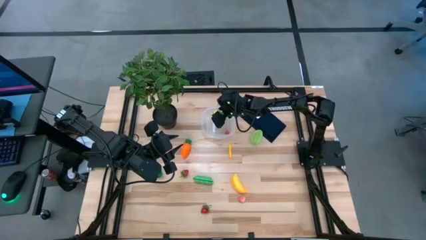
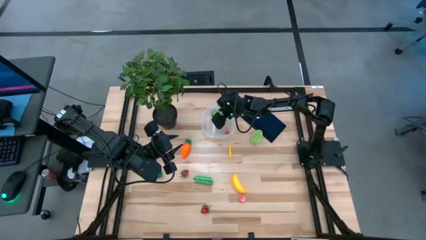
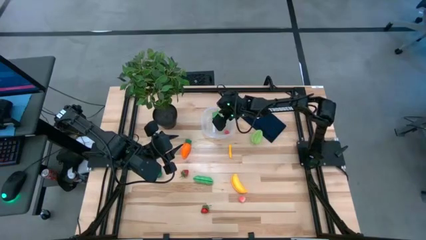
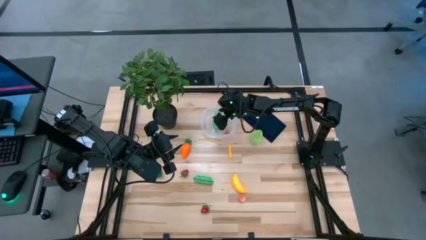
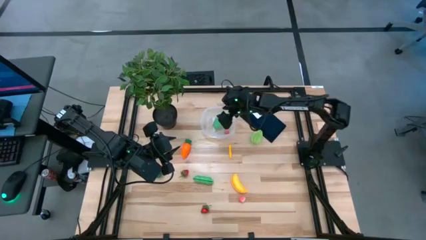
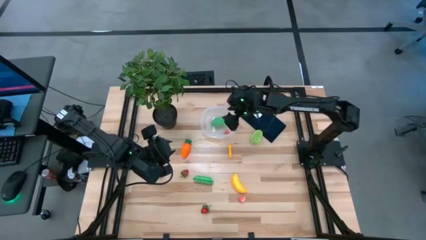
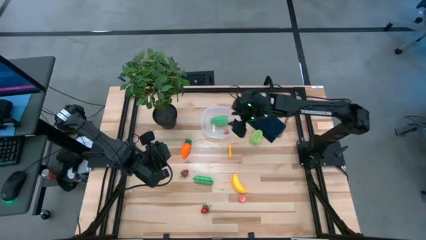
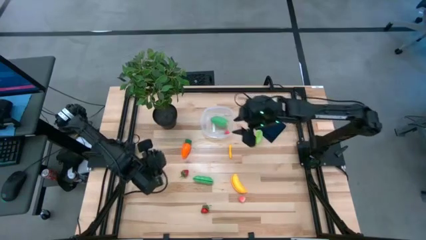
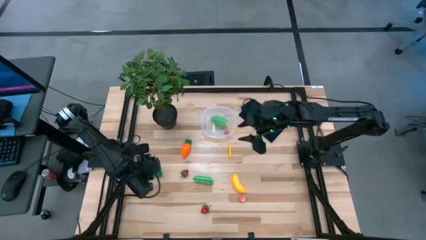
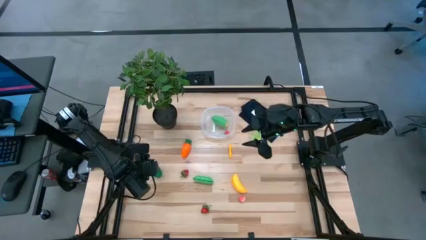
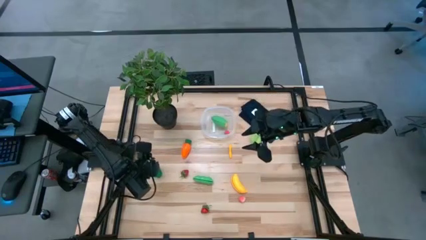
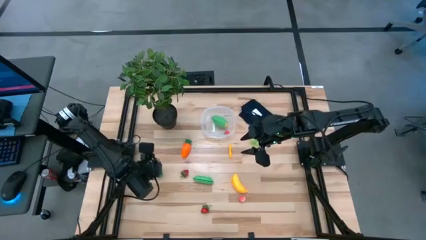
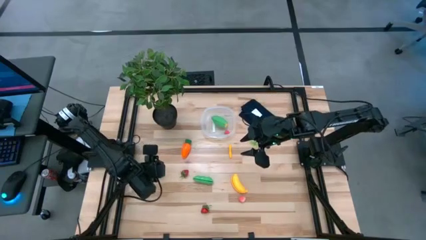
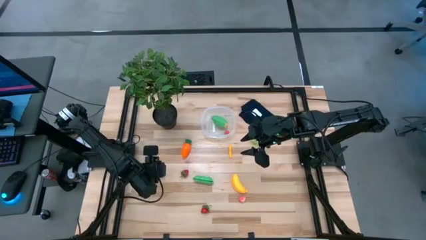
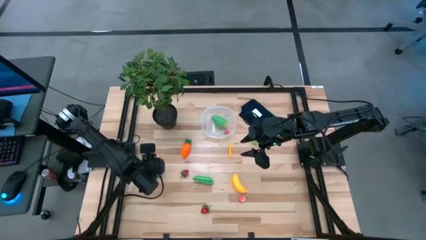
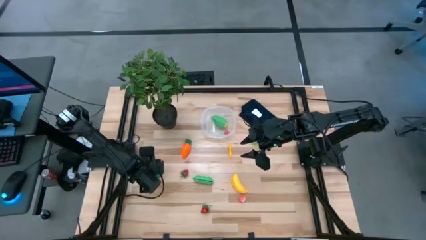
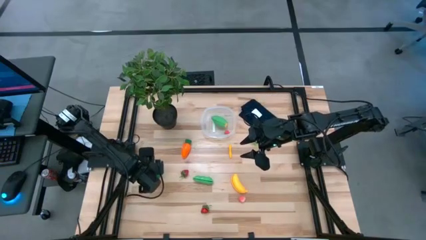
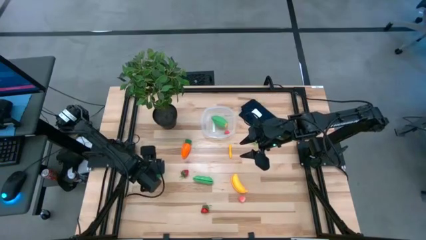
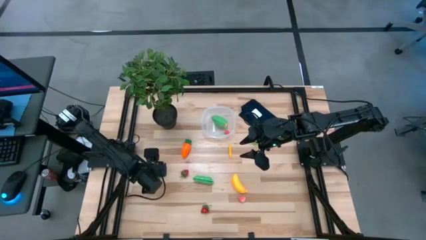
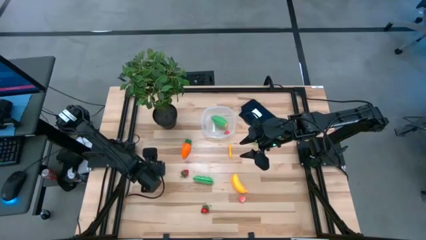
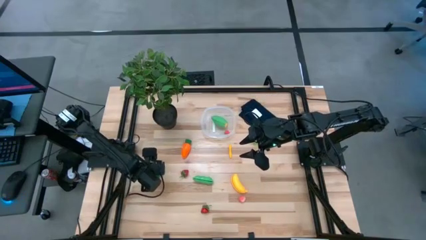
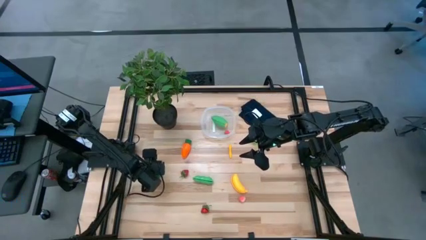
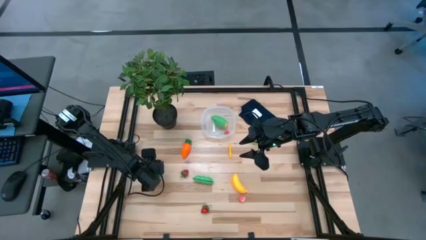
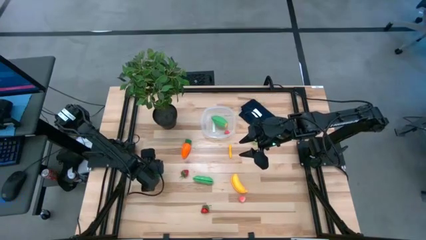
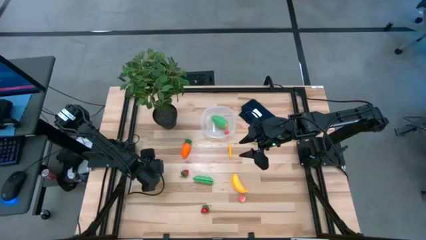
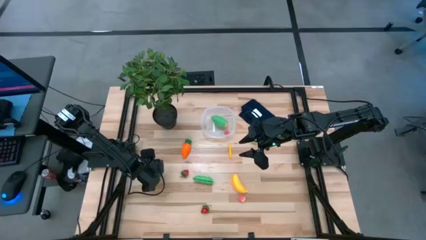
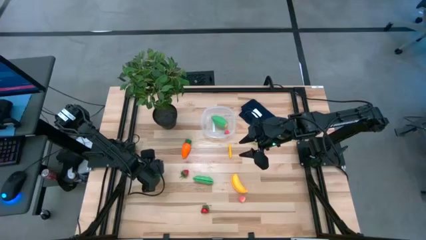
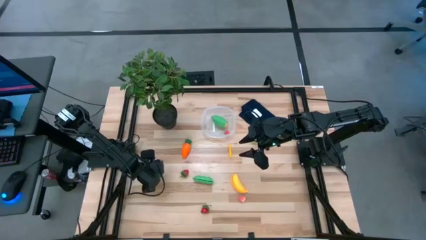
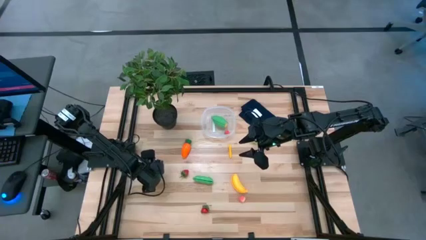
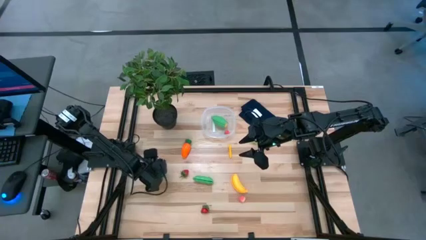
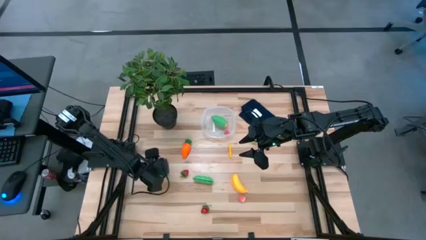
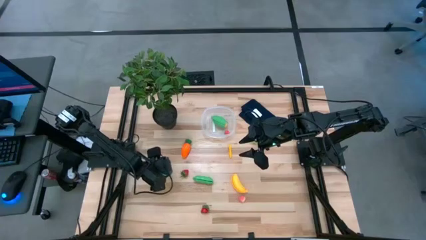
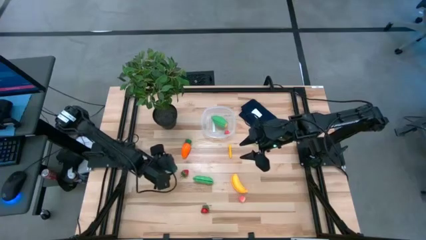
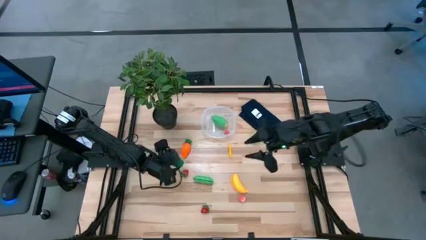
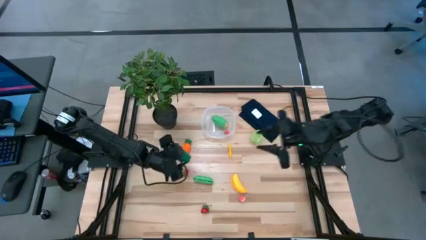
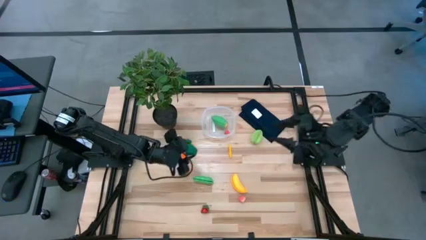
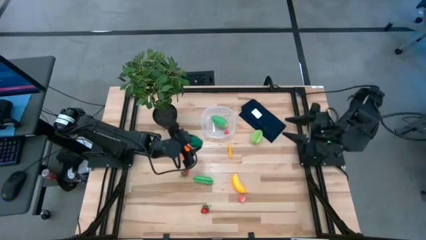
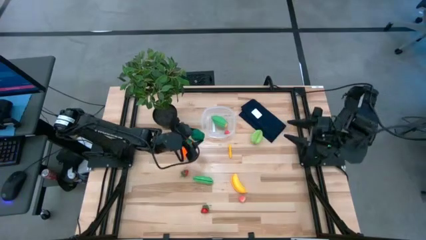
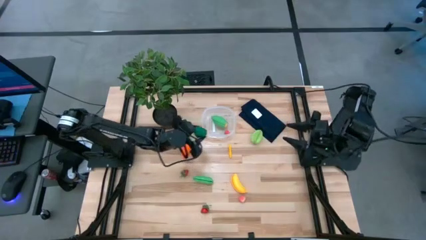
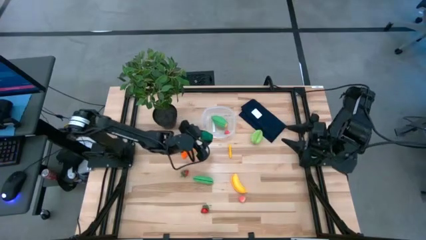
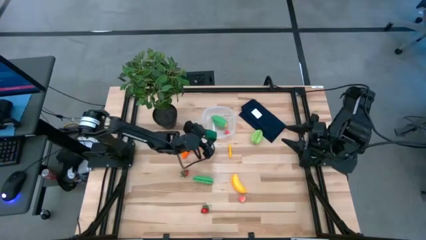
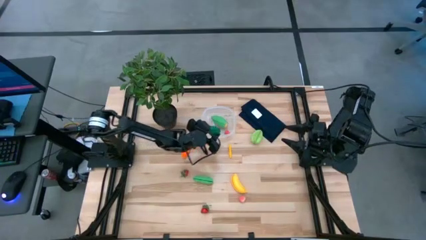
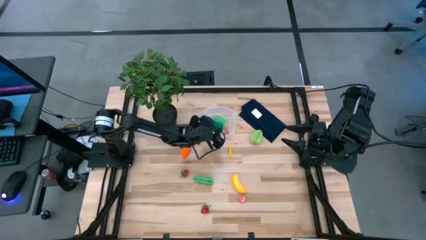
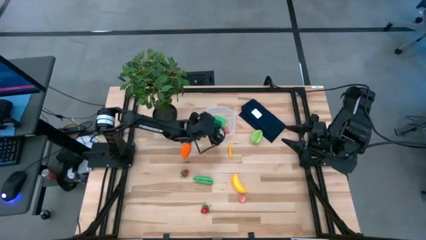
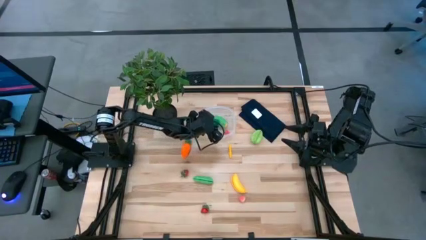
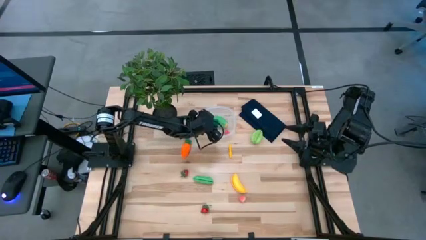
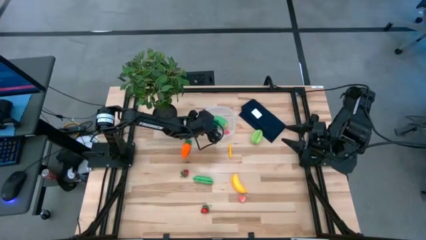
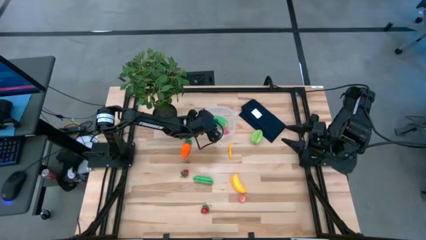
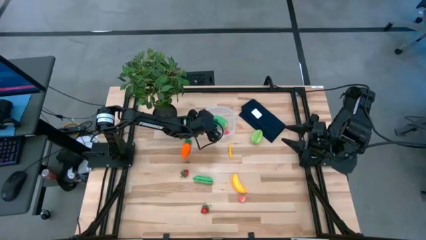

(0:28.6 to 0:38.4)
Task: Pick and placing Produce into tupperware
Put the green bell pepper into the transparent bin

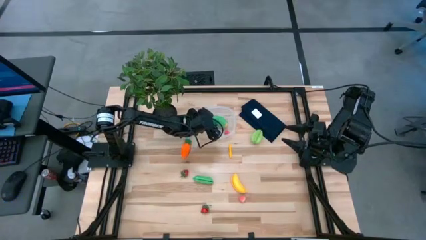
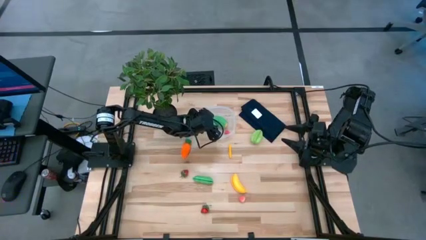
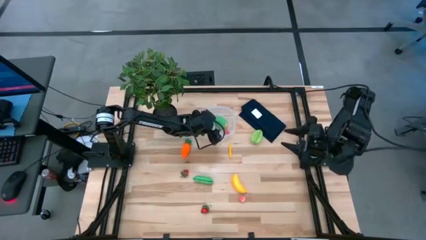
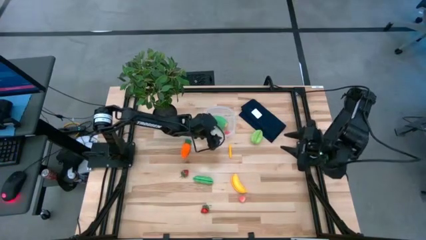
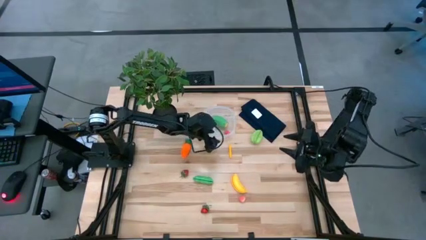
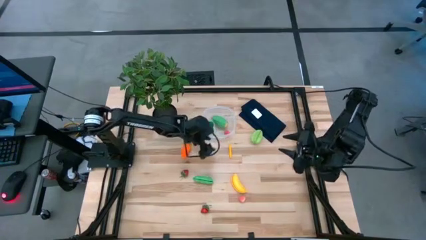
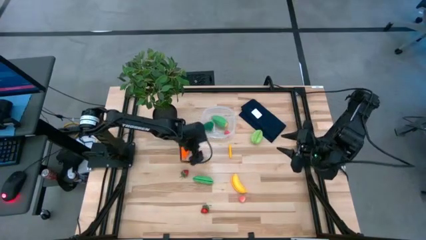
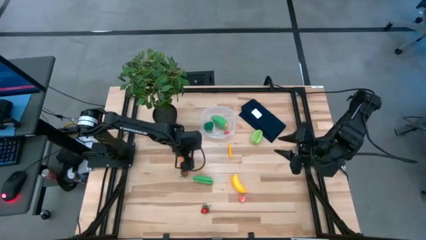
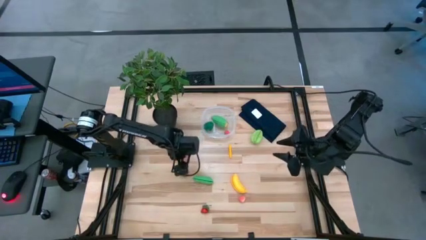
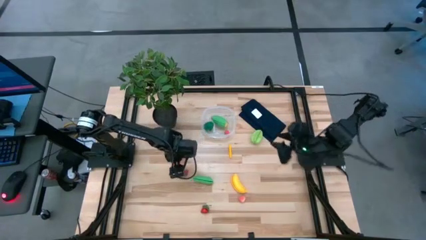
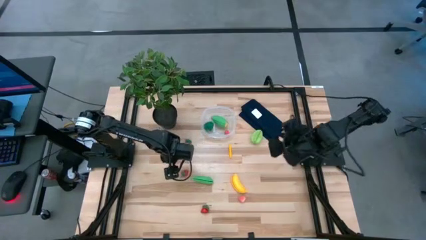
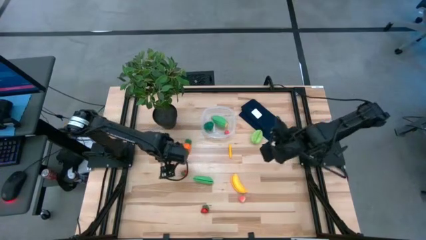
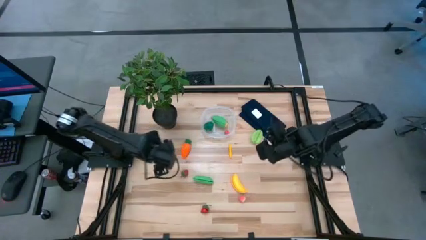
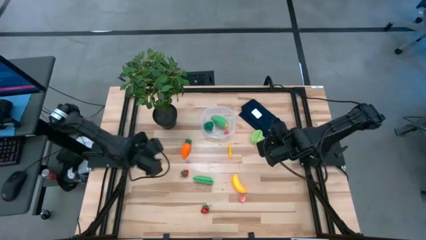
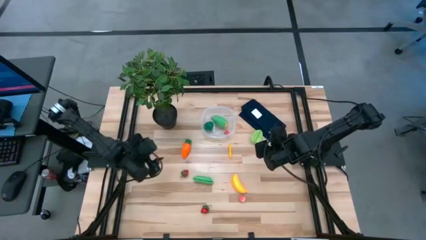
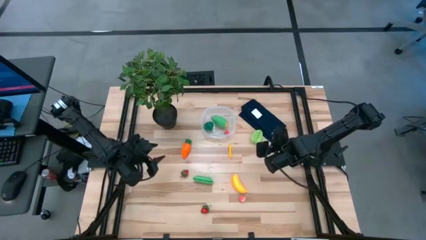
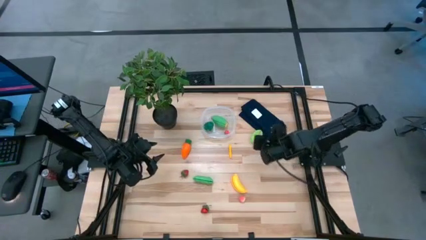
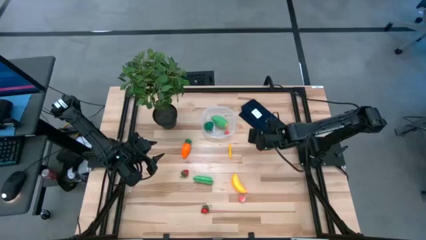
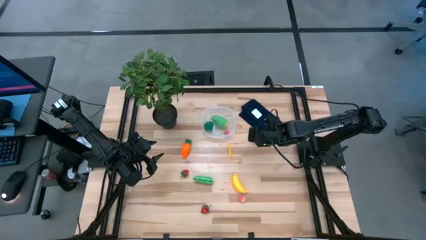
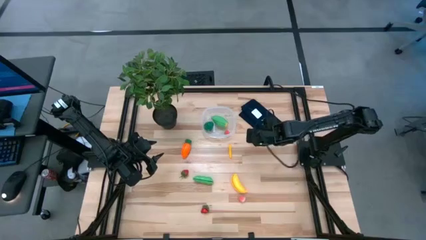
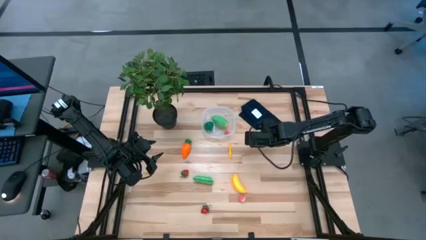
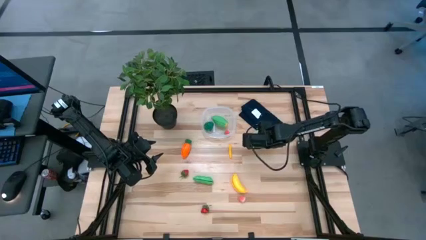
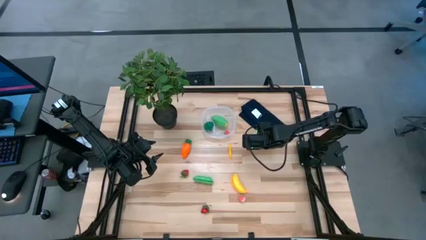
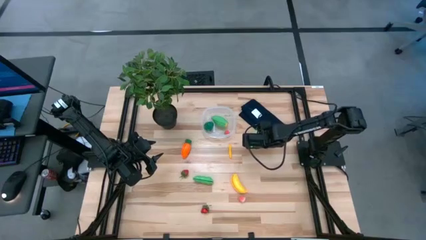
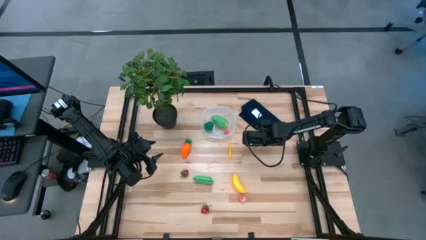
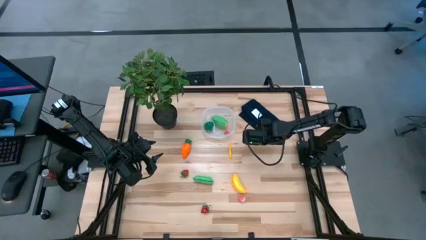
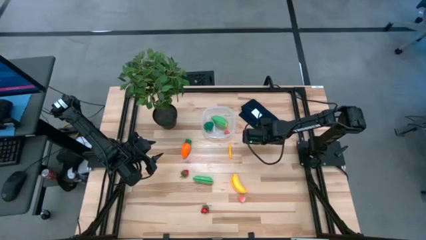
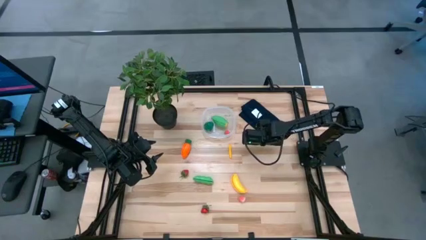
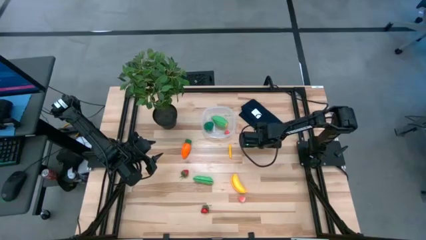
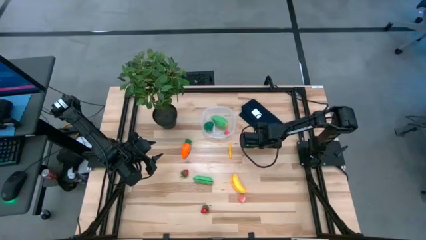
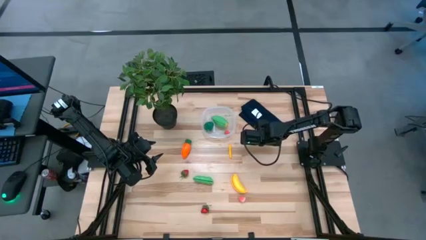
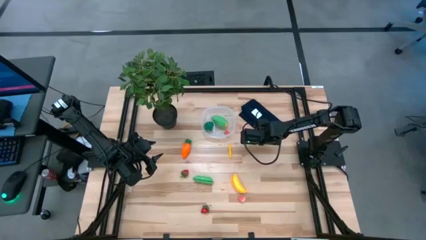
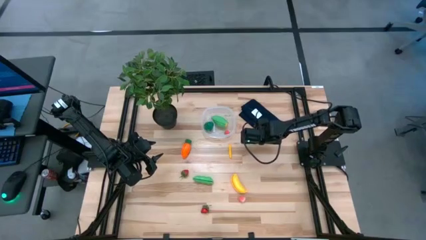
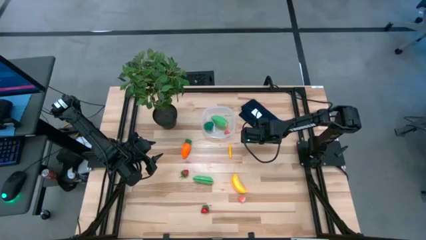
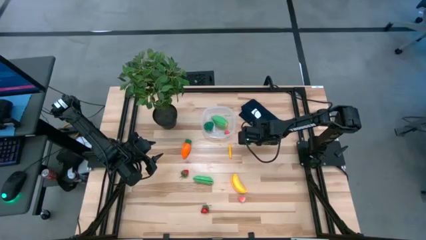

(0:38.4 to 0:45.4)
Put the green starfruit into the transparent bin
